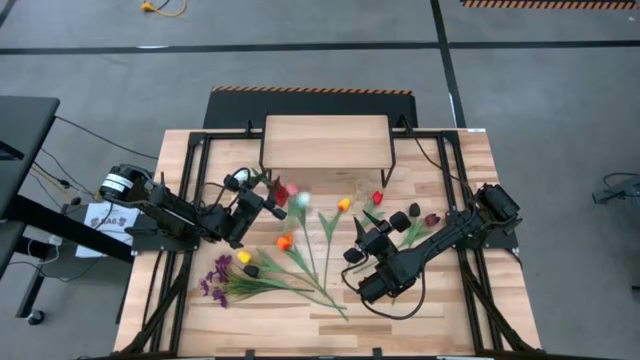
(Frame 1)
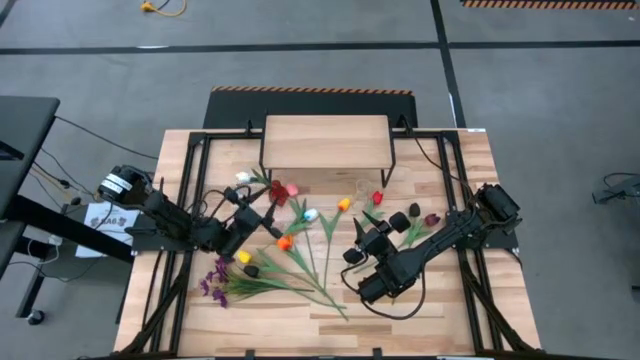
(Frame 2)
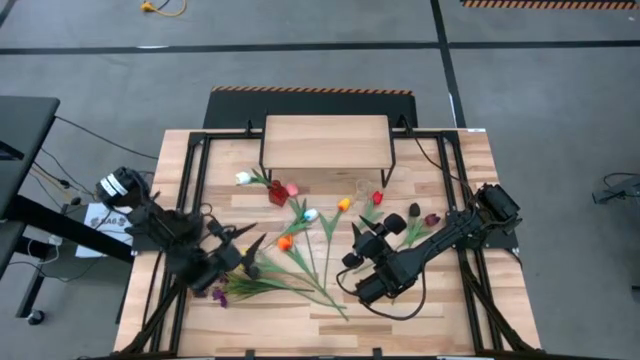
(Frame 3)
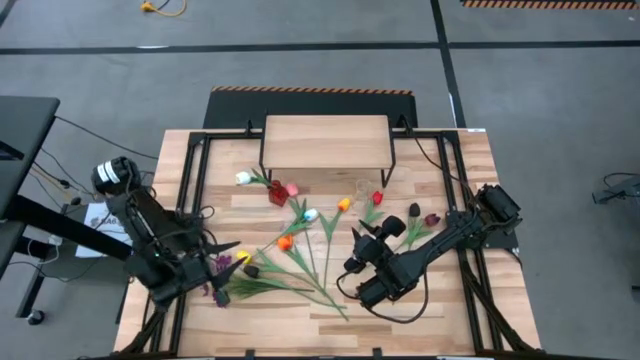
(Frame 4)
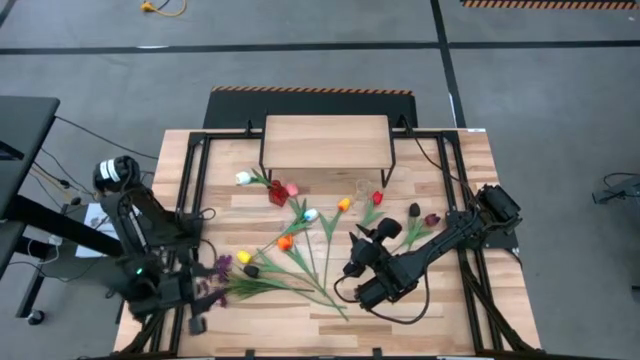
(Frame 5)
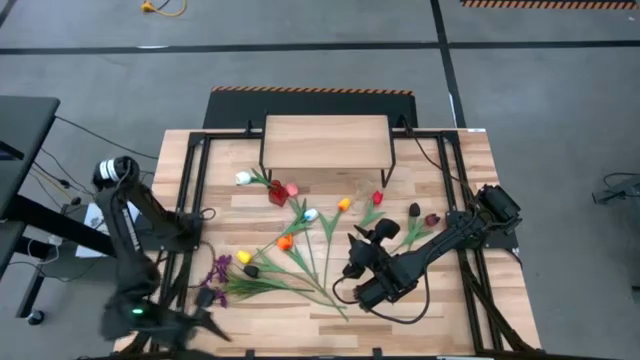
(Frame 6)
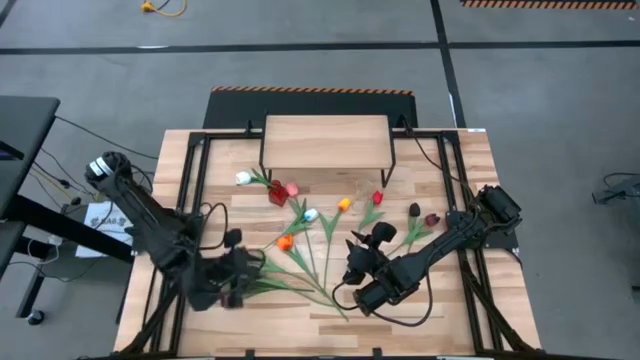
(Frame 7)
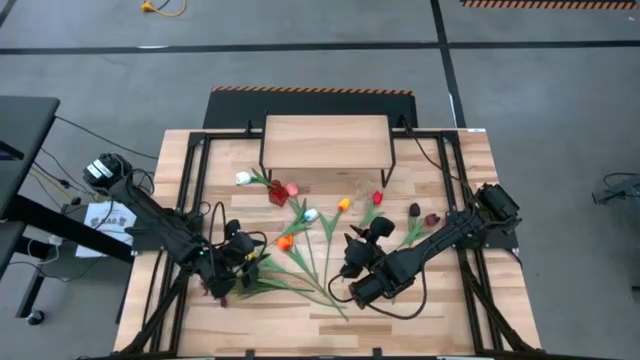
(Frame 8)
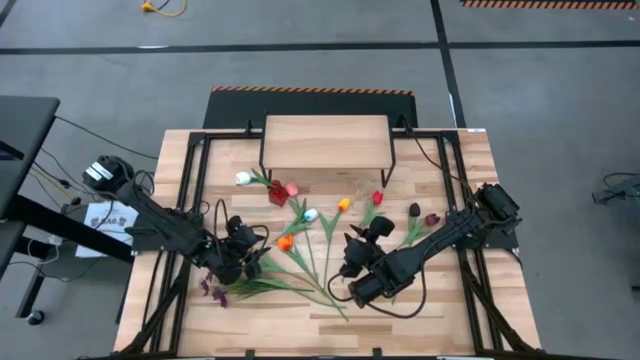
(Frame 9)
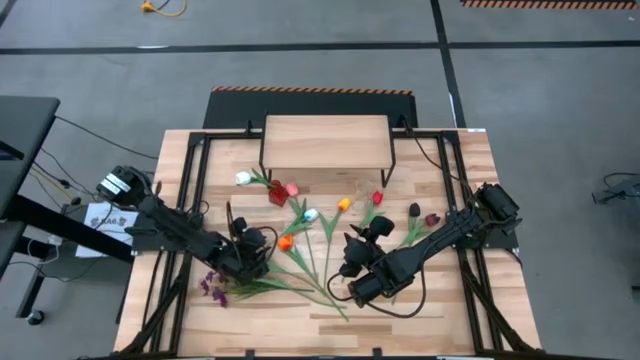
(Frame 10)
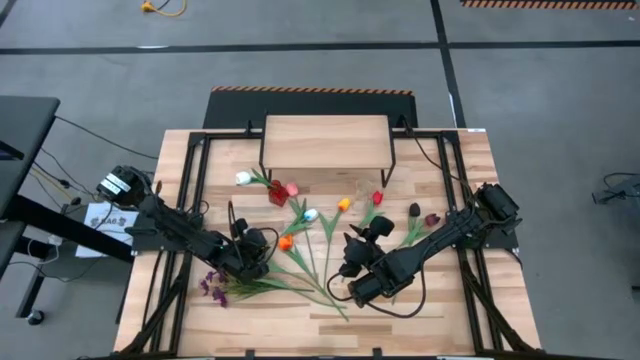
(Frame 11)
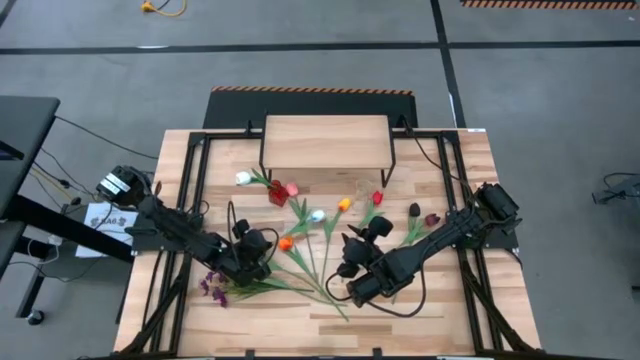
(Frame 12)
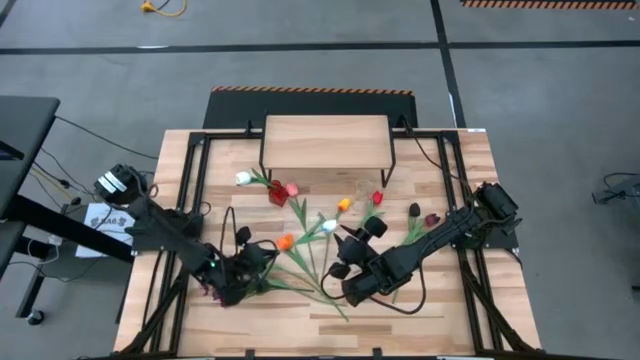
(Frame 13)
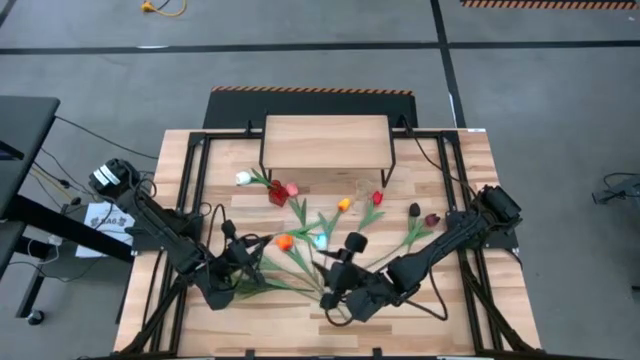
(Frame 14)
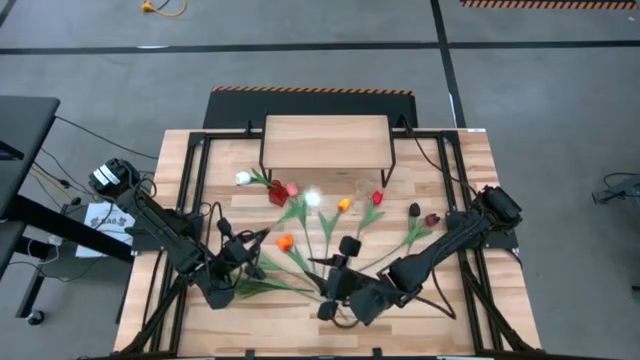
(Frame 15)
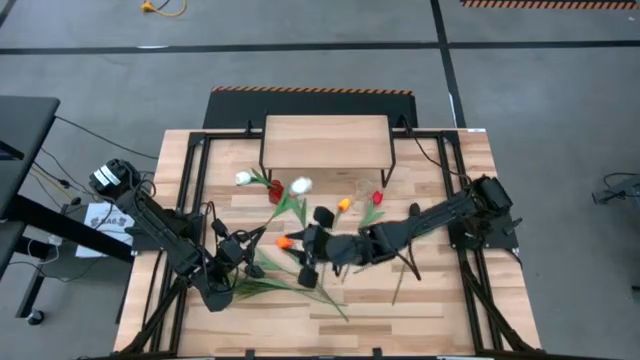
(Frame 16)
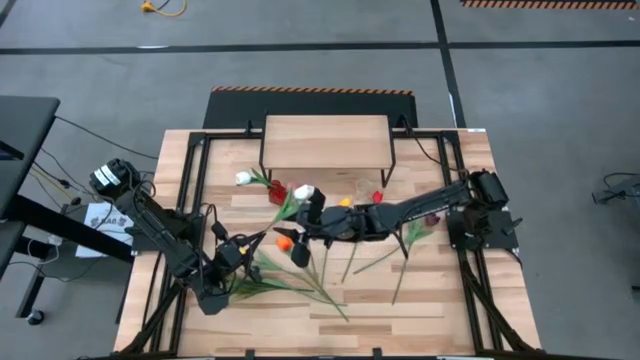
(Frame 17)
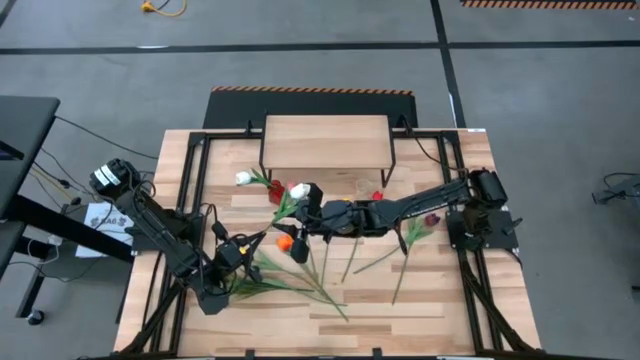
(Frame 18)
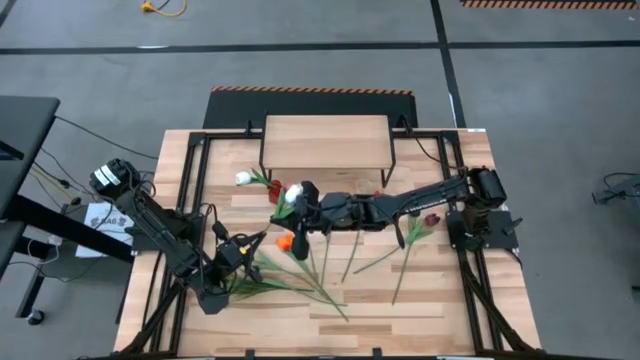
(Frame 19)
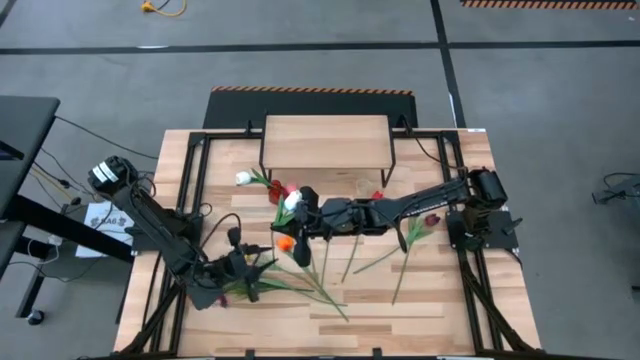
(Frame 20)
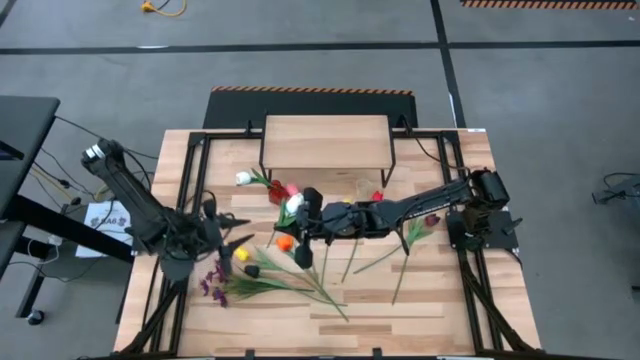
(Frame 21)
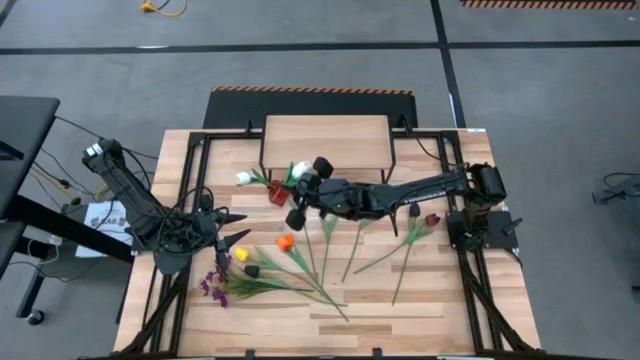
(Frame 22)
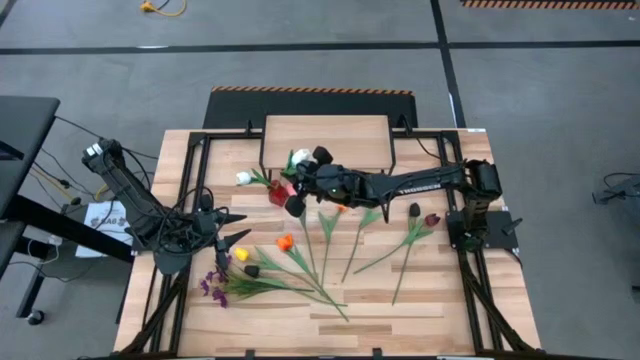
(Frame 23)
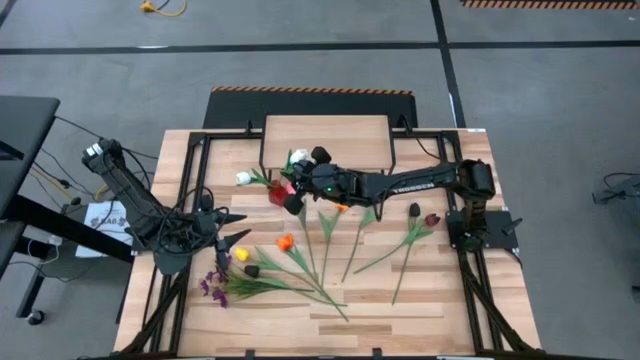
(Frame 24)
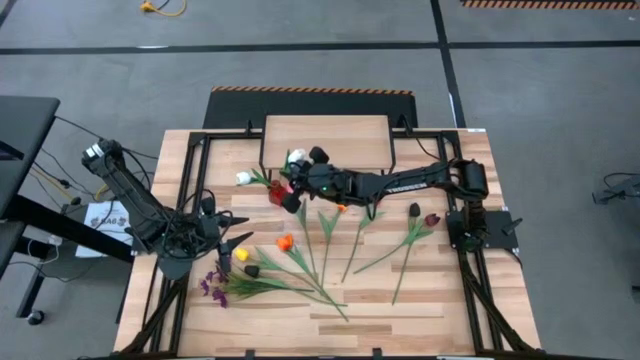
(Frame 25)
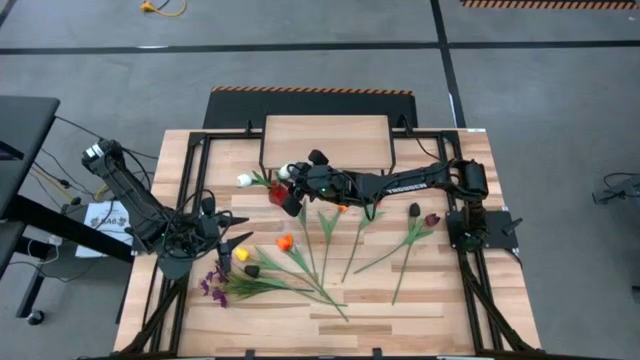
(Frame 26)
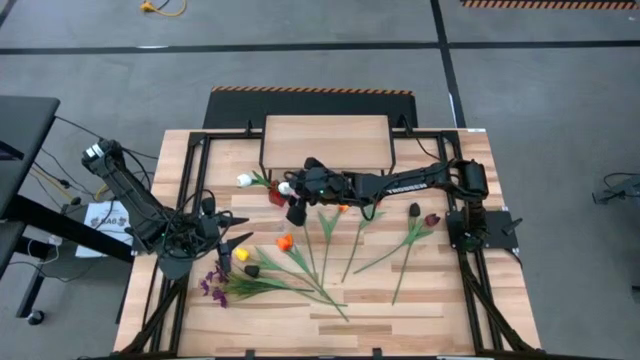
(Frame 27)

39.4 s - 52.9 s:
Task: Pick and place flowers into a vace then onto a shelf
Put the white flower into the red flower vase
